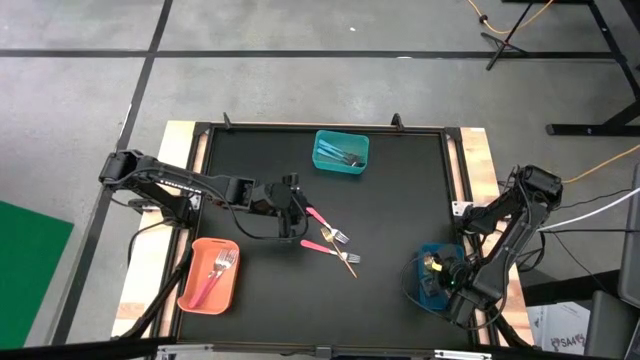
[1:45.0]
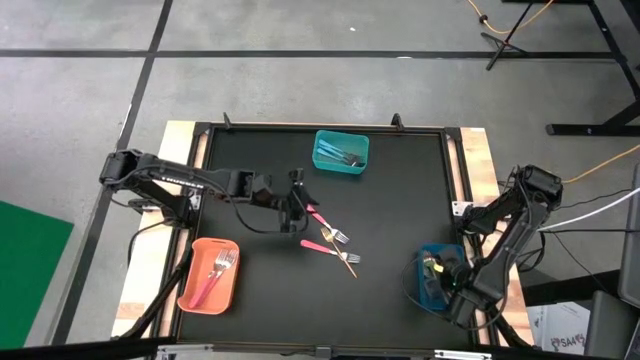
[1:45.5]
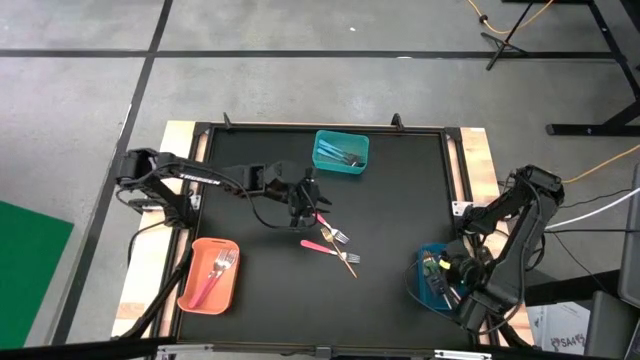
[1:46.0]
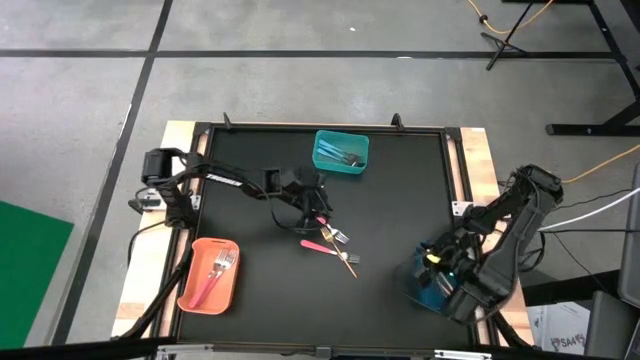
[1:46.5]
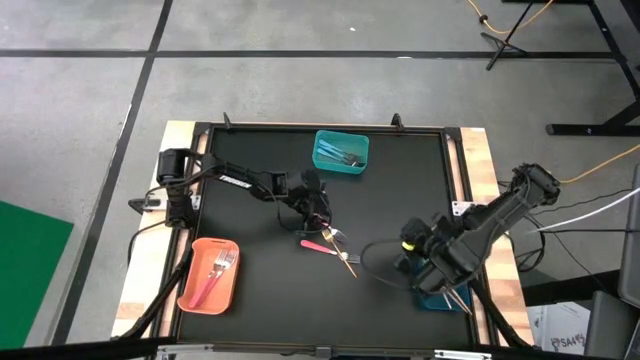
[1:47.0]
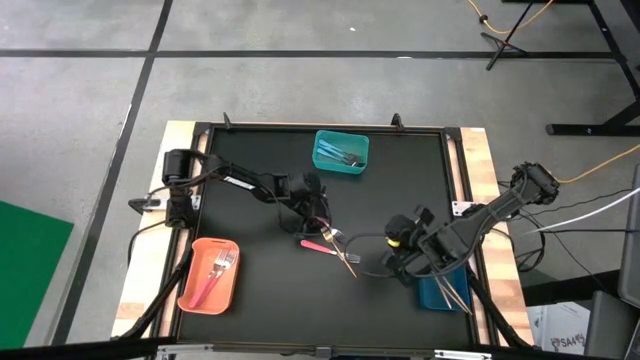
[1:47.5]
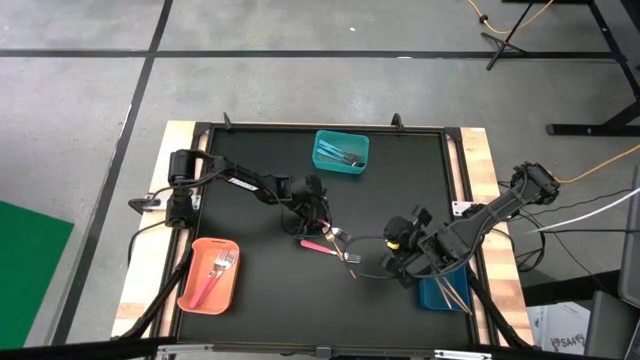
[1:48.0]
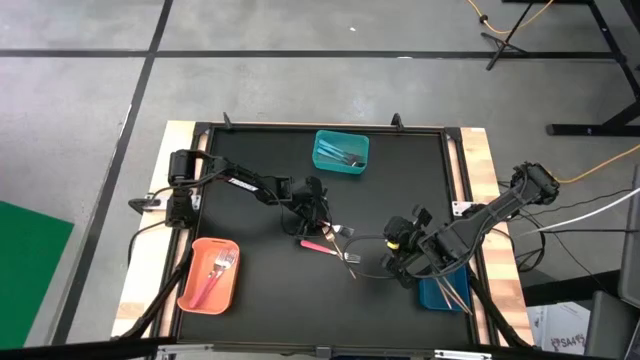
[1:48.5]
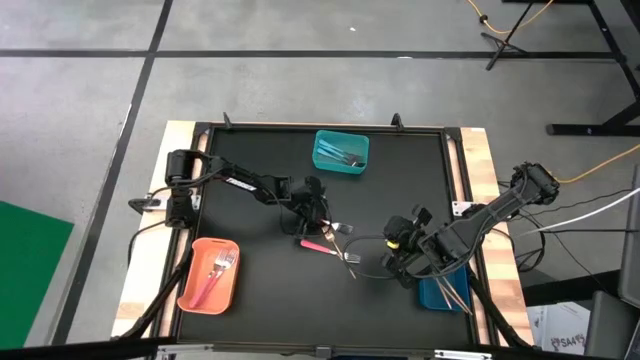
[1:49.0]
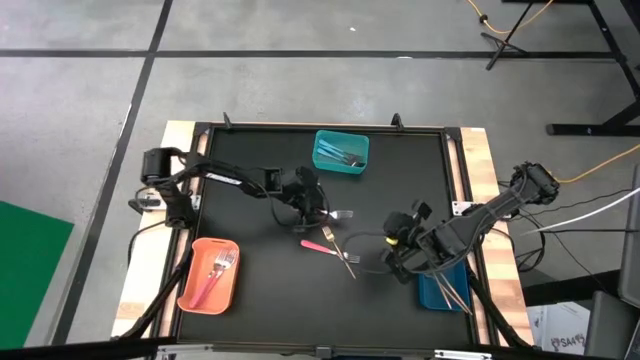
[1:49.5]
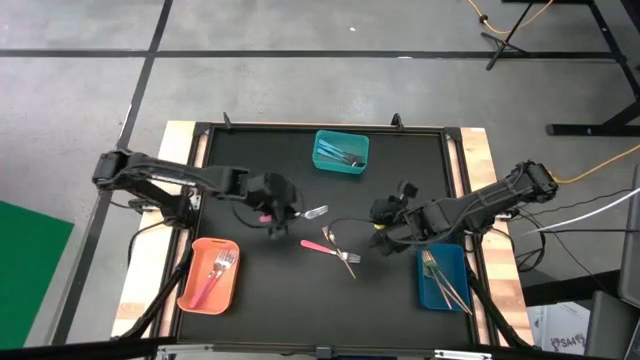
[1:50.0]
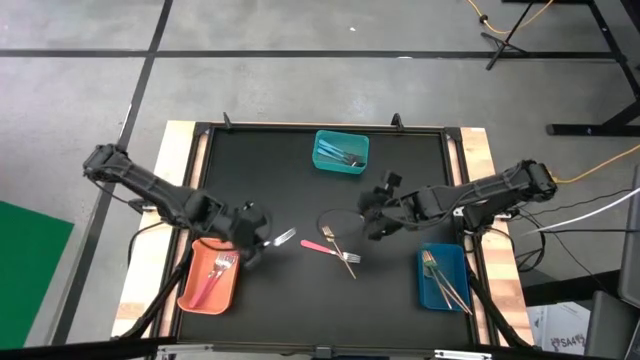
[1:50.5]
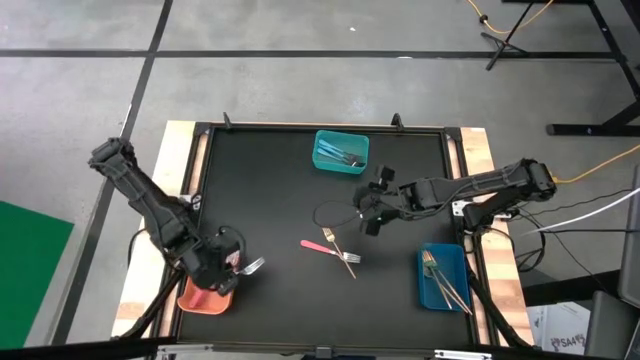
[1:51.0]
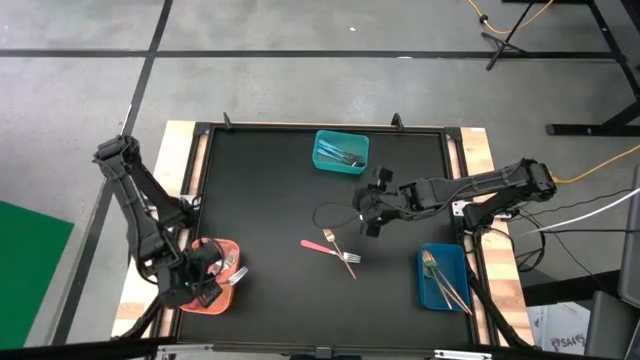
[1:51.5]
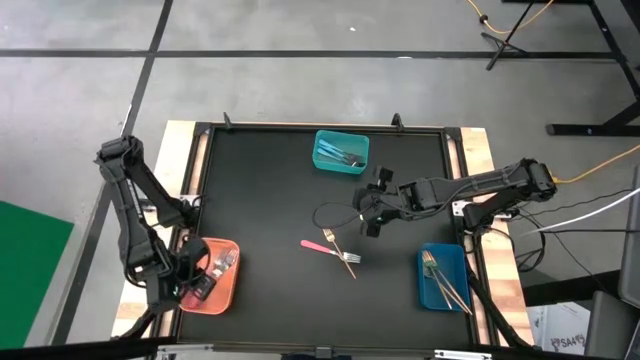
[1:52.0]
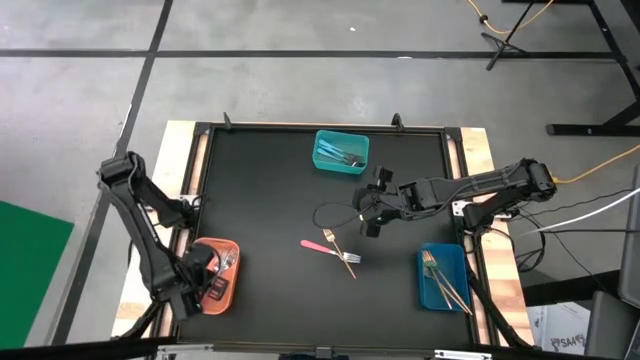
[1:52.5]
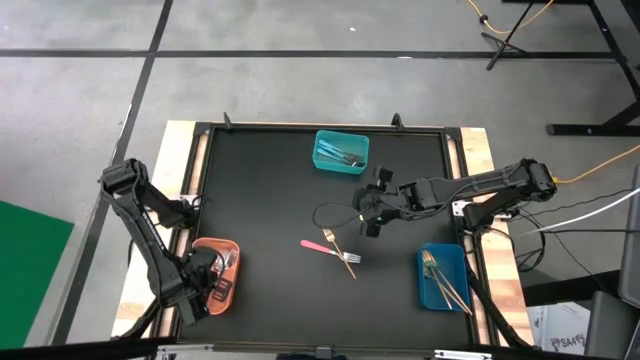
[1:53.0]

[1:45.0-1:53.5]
Task: Sort silverware by color (type)
Put the pink fork into the orange bin

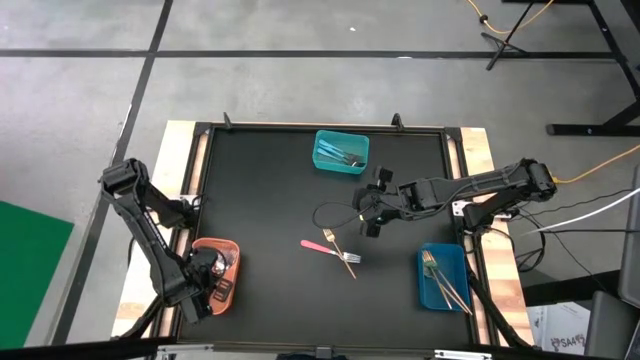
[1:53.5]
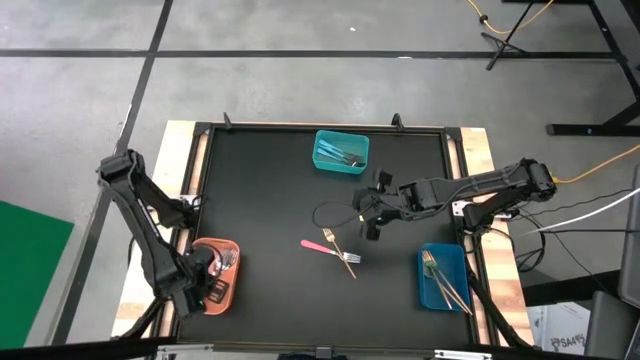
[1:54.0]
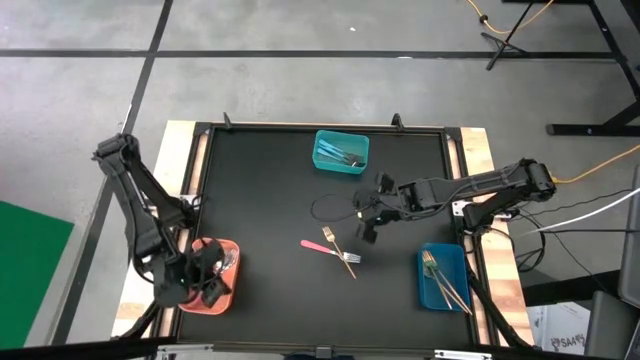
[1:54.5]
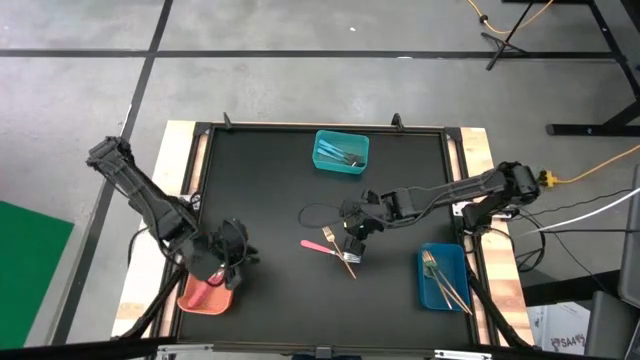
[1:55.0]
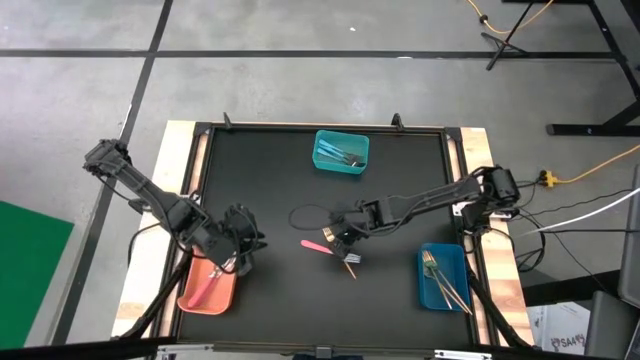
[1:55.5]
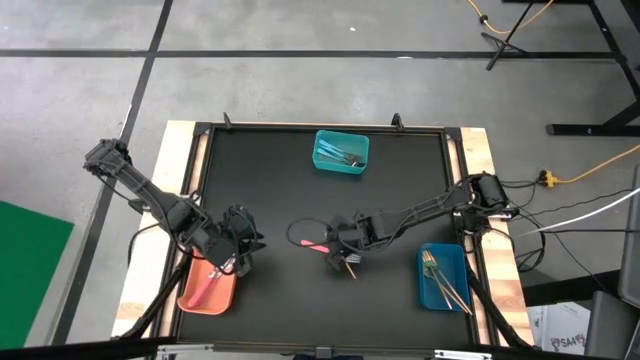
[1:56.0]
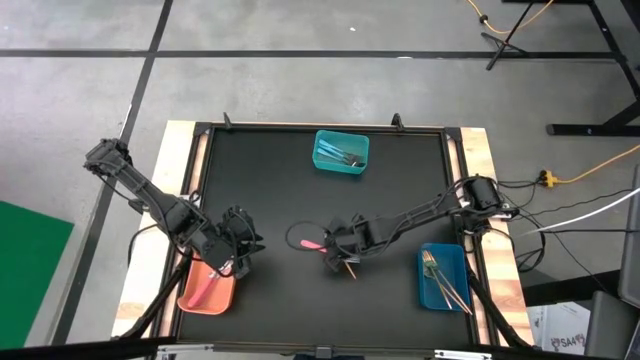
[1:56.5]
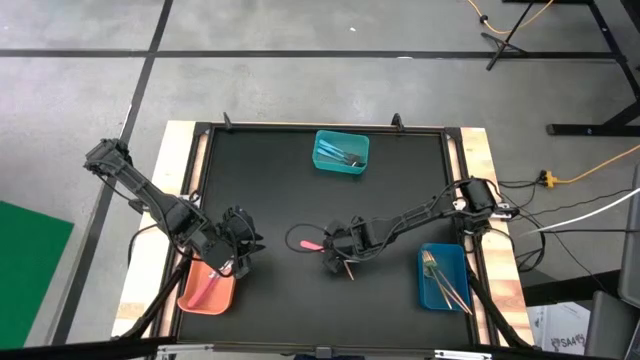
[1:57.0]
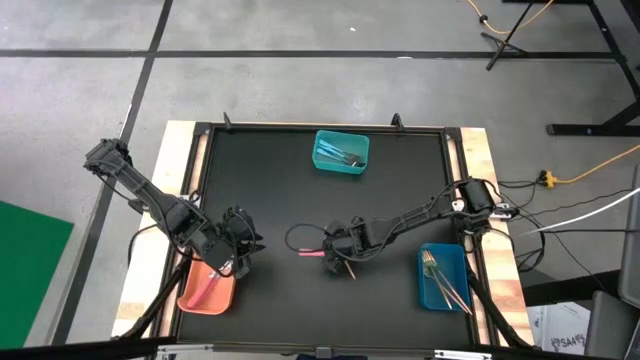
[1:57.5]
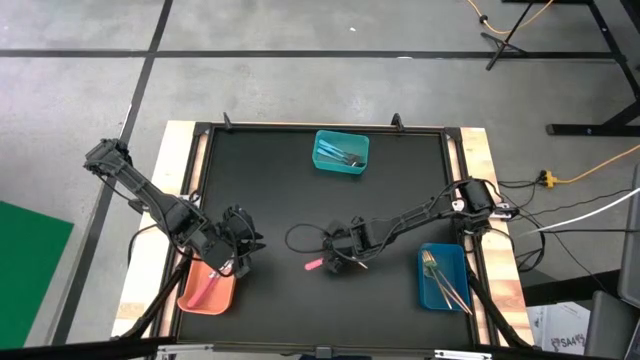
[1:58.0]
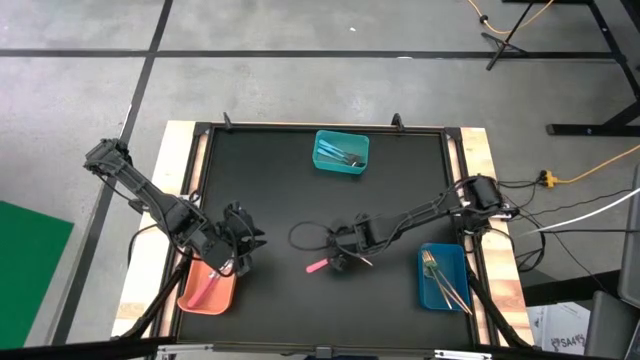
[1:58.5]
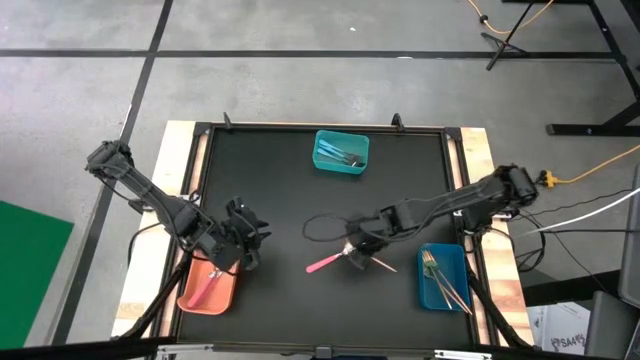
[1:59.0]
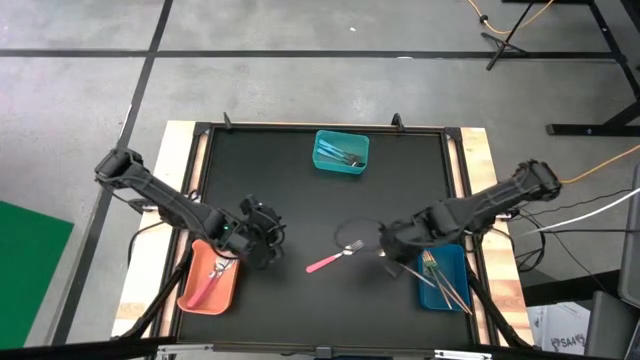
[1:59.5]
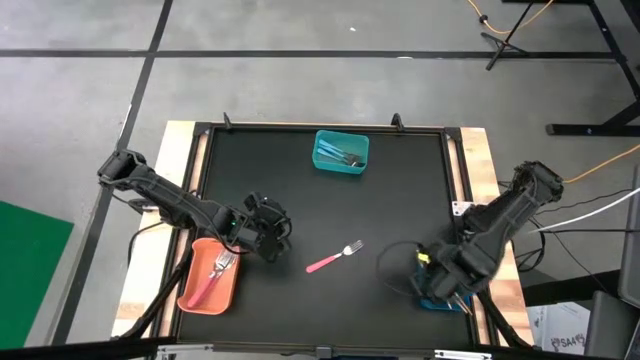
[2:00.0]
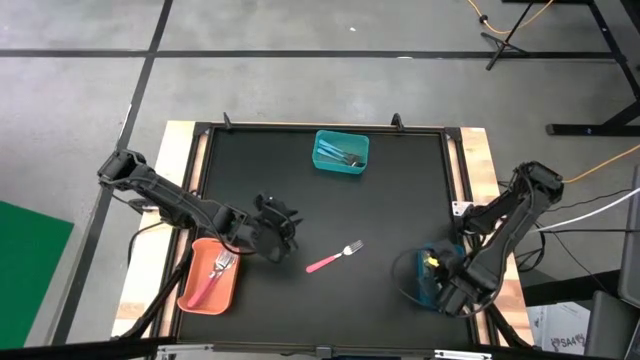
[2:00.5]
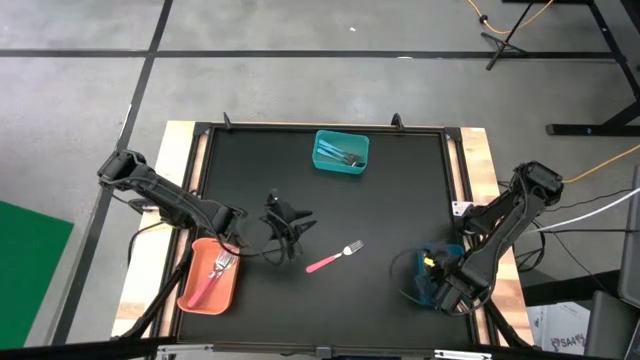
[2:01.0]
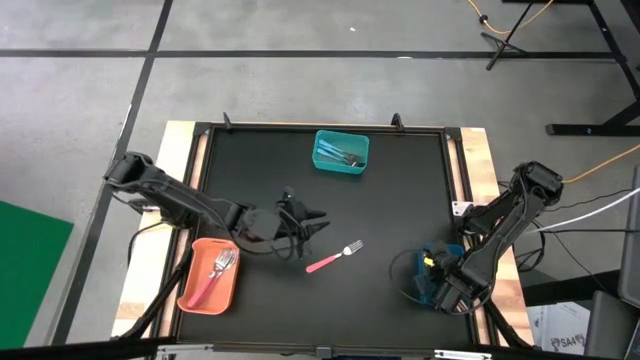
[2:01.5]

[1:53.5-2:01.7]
Put the gold fork into the blue bin

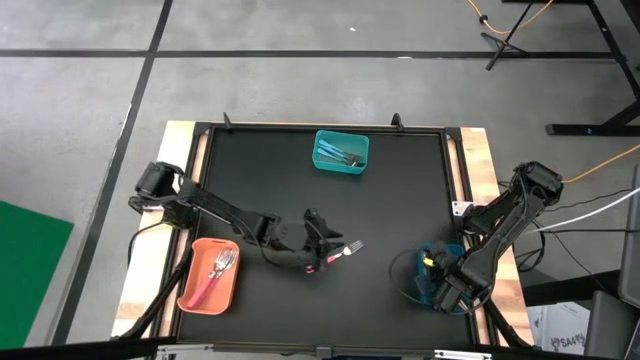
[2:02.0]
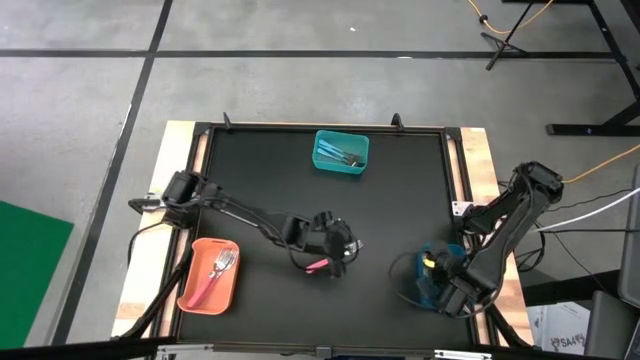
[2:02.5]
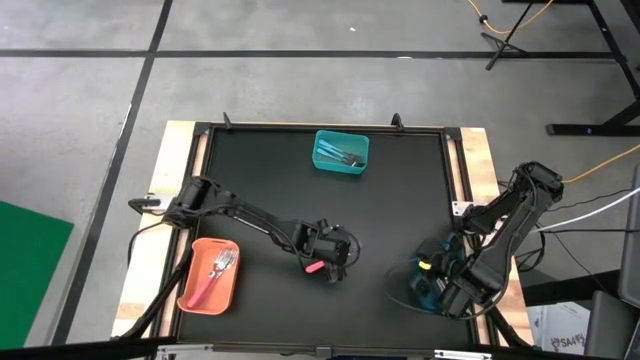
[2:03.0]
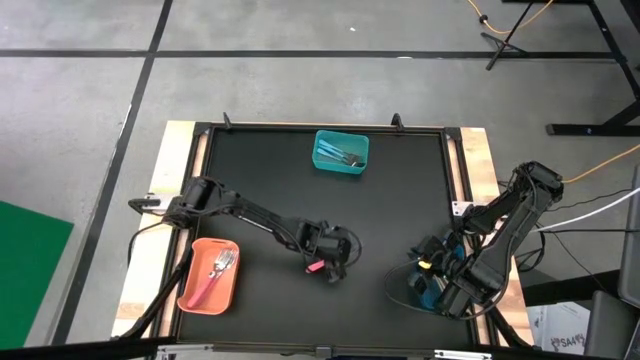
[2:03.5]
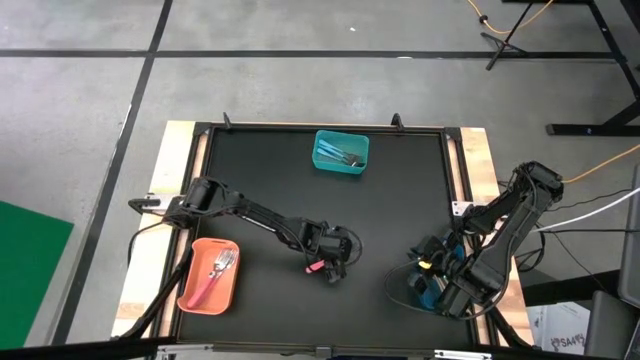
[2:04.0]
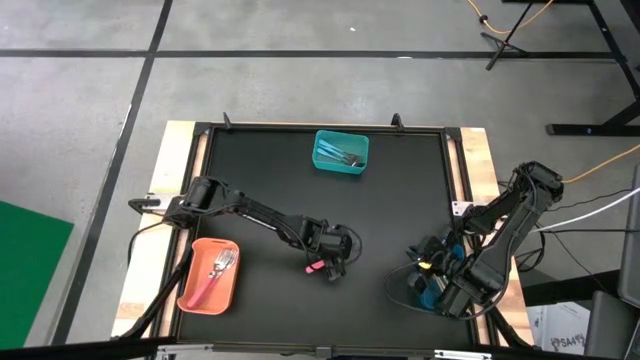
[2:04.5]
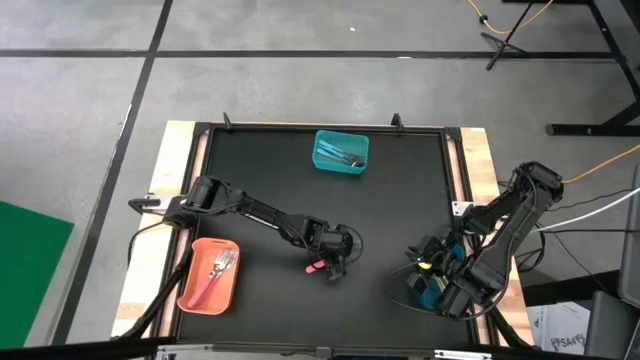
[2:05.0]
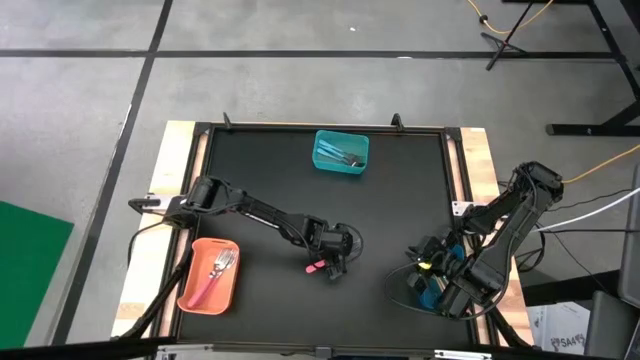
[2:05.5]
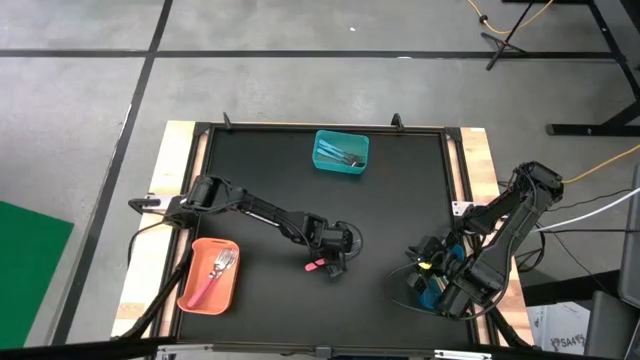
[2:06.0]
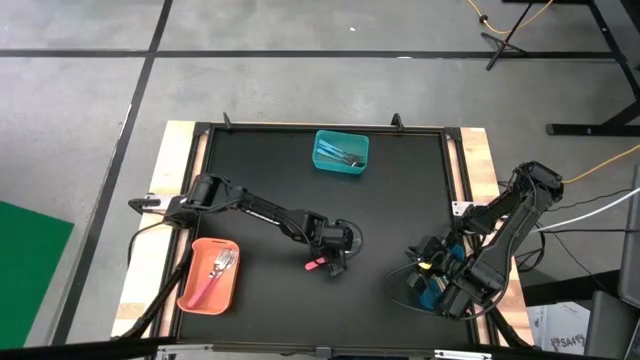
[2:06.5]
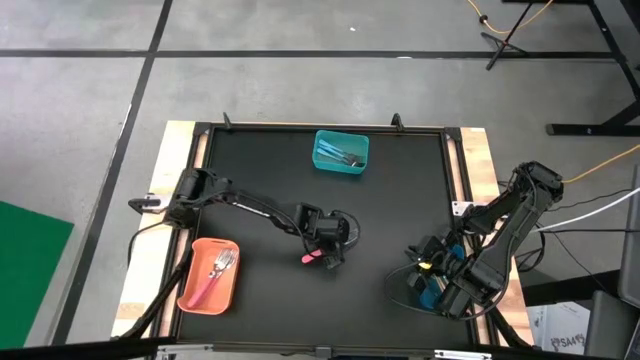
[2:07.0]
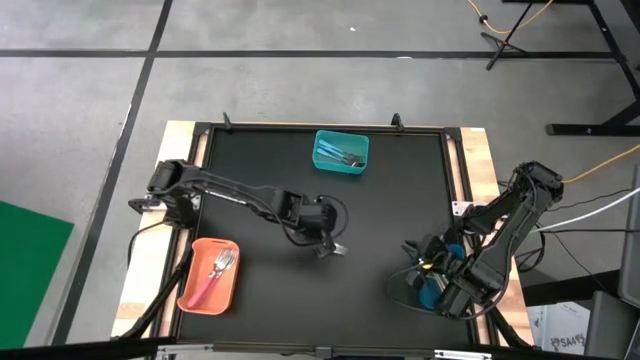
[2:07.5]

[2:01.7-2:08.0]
Put the pink fork into the orange bin
